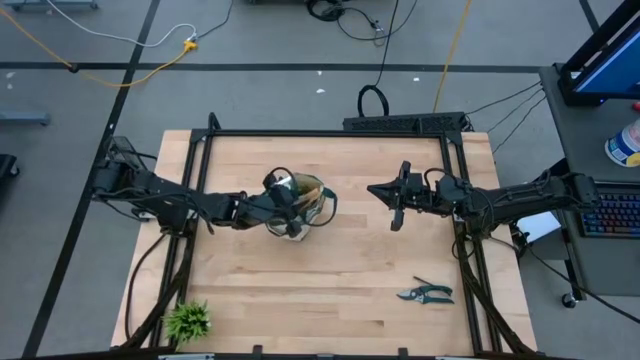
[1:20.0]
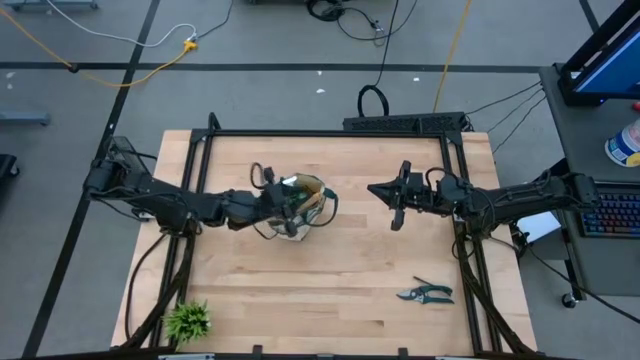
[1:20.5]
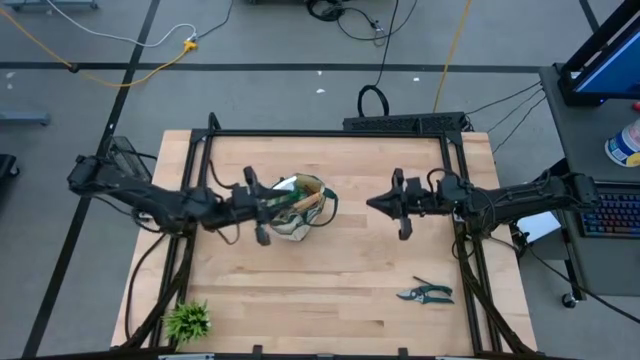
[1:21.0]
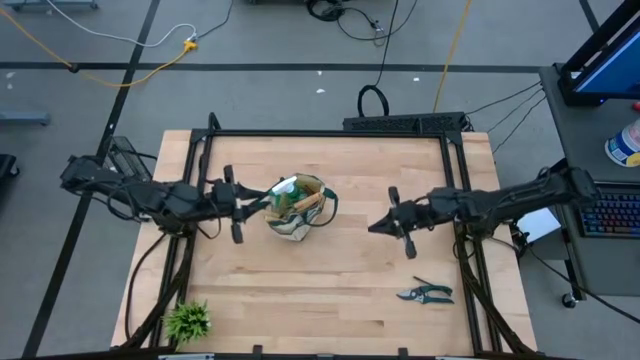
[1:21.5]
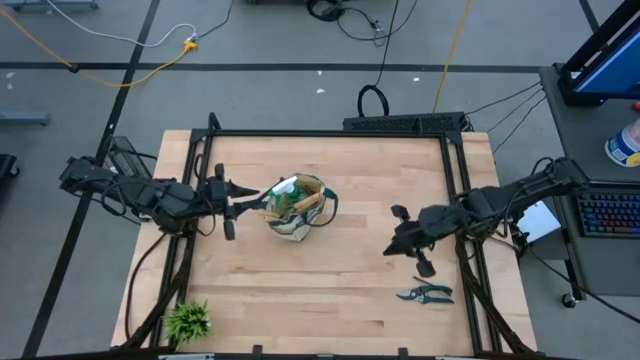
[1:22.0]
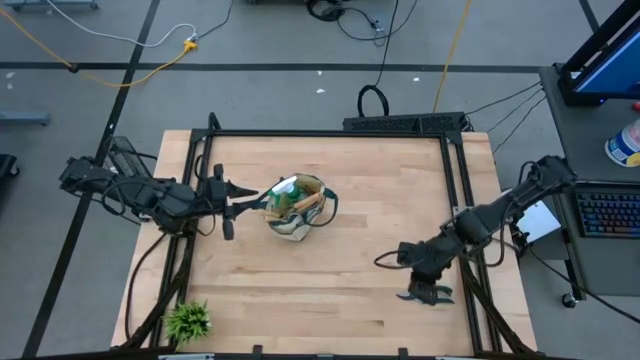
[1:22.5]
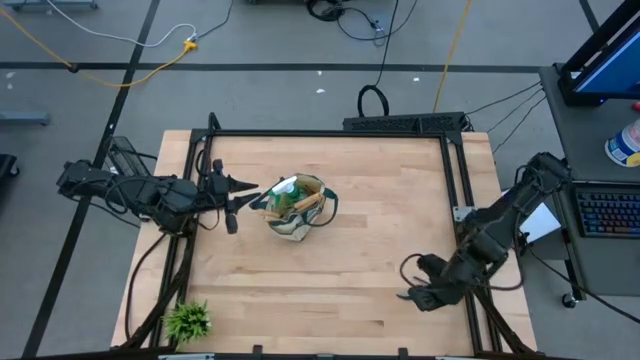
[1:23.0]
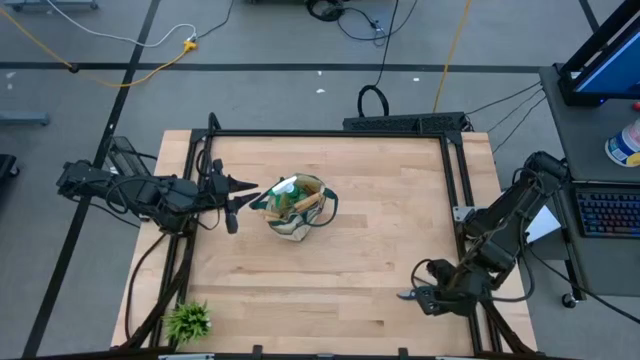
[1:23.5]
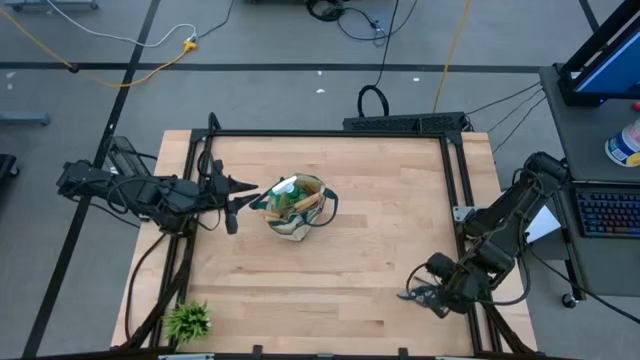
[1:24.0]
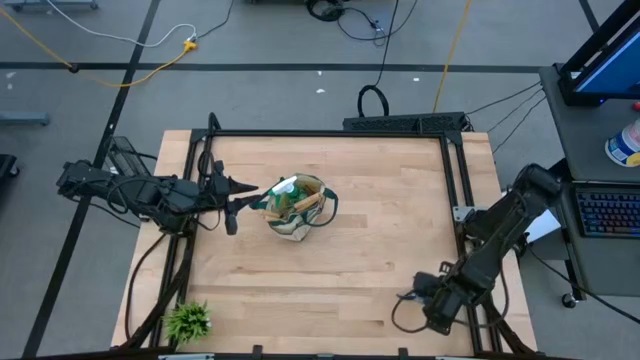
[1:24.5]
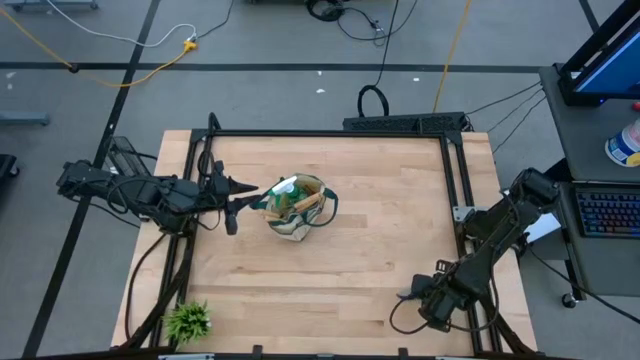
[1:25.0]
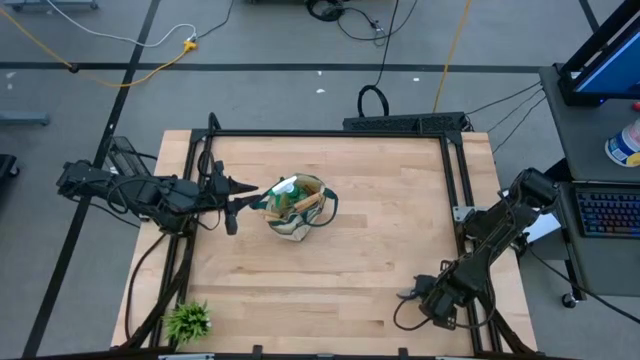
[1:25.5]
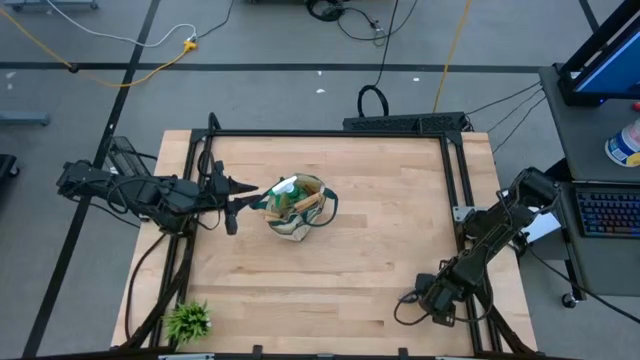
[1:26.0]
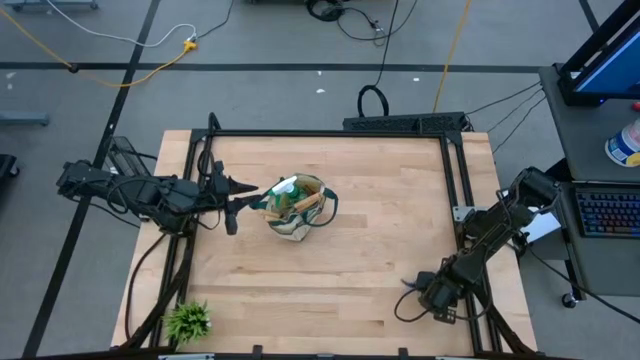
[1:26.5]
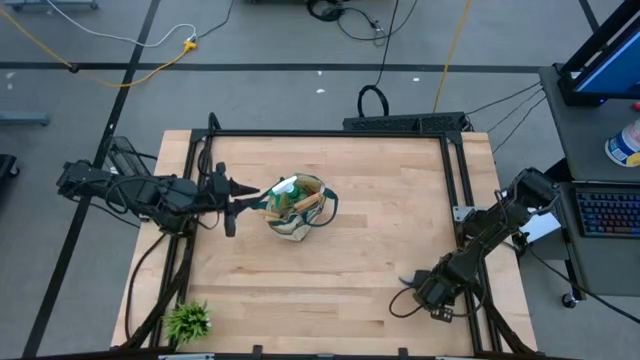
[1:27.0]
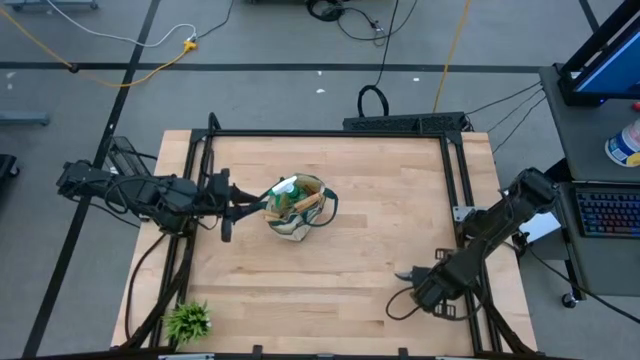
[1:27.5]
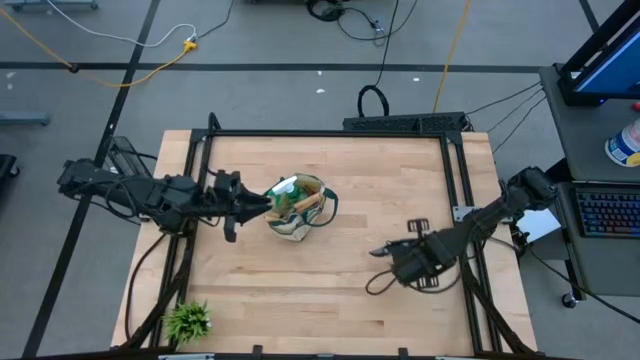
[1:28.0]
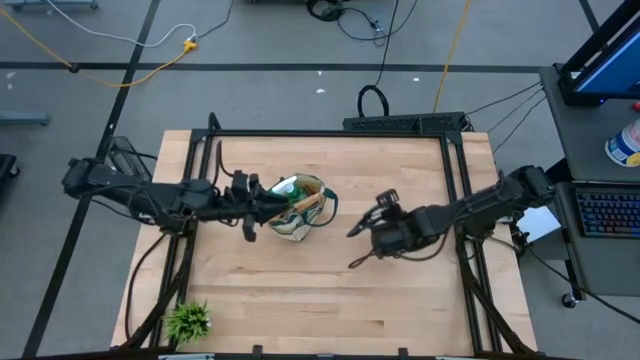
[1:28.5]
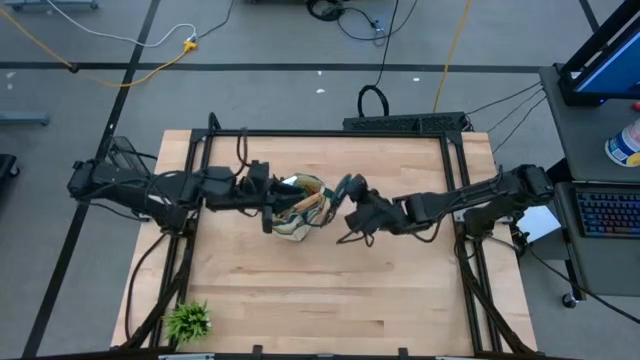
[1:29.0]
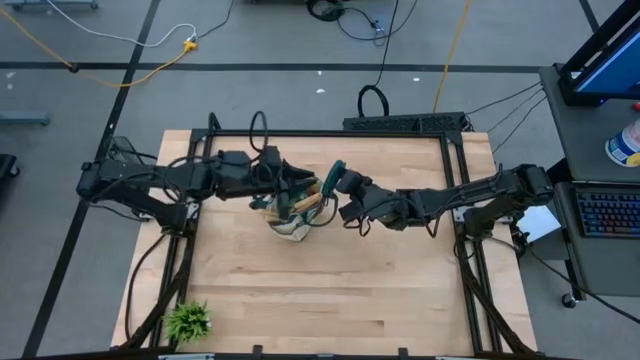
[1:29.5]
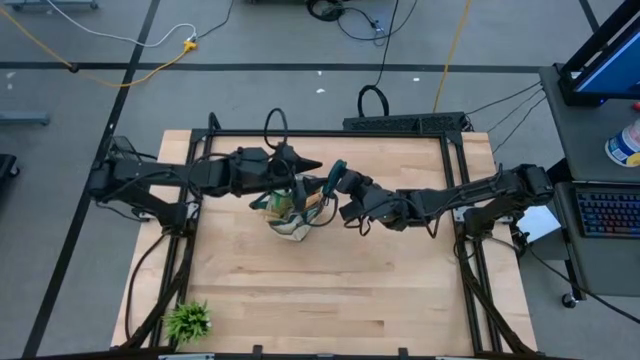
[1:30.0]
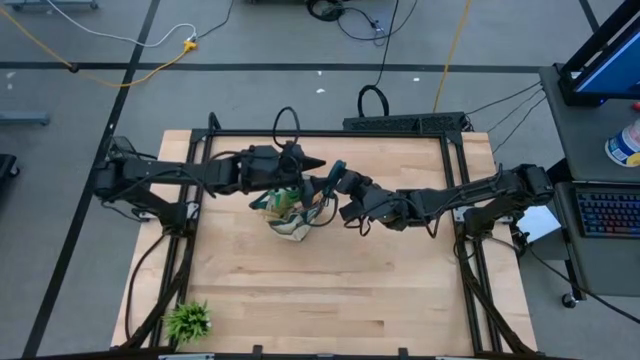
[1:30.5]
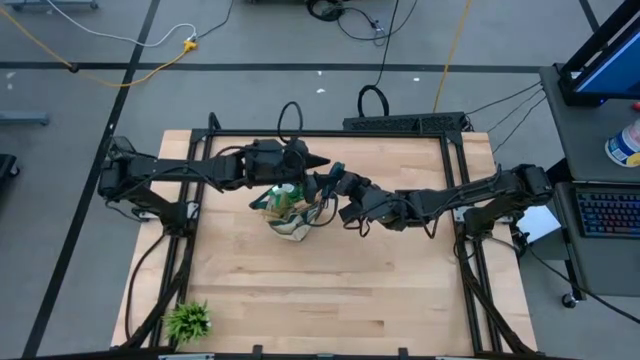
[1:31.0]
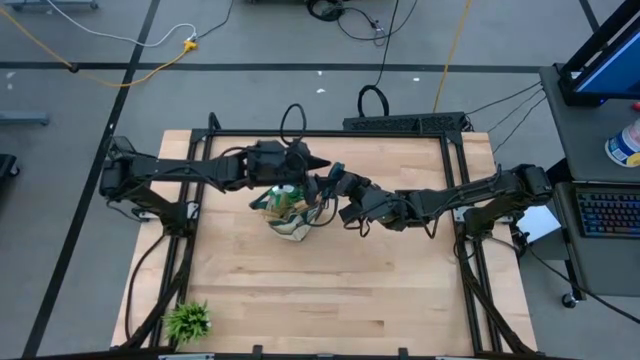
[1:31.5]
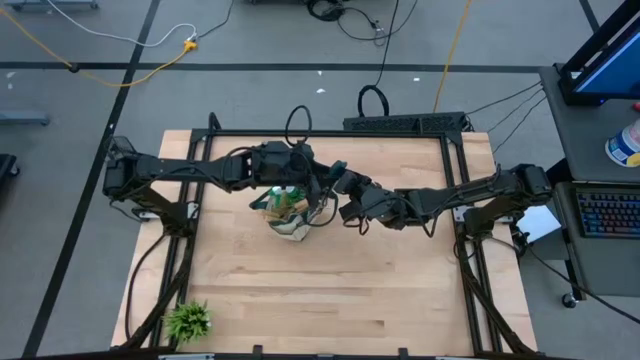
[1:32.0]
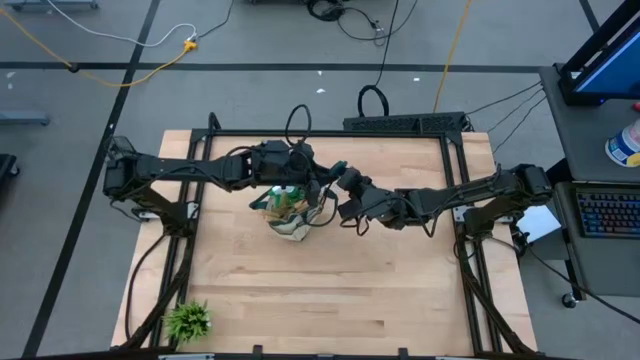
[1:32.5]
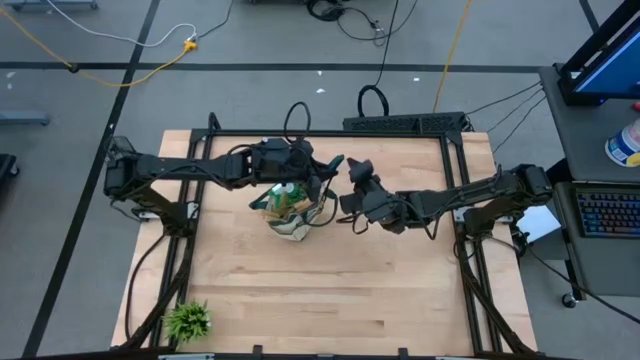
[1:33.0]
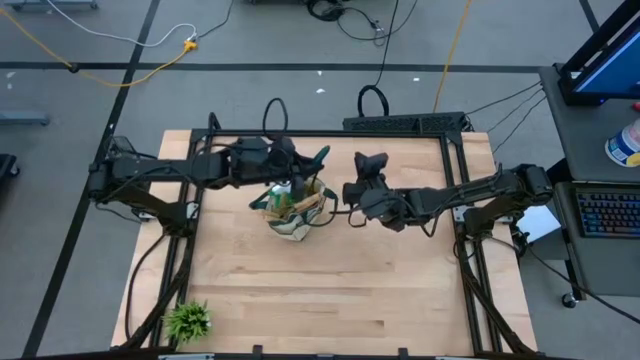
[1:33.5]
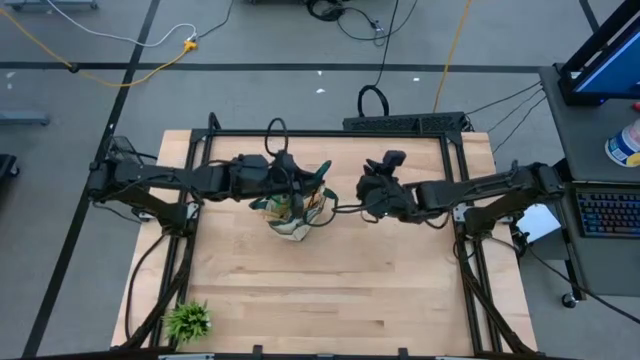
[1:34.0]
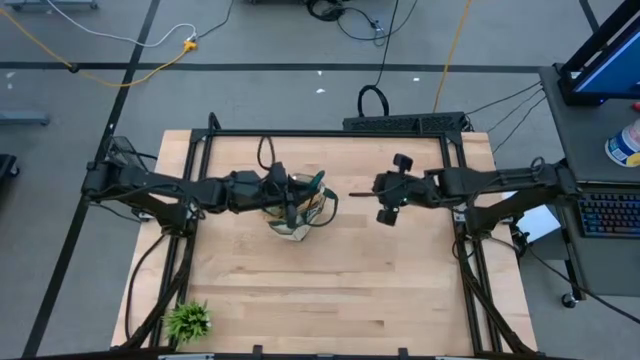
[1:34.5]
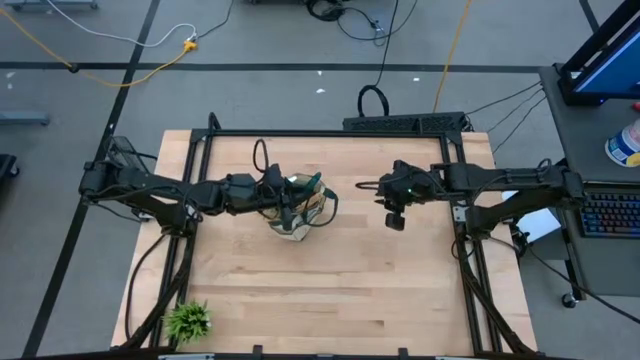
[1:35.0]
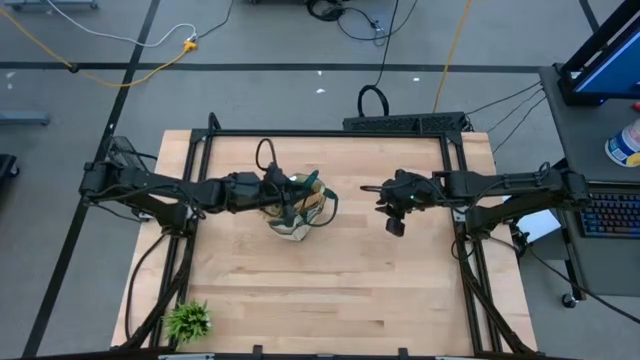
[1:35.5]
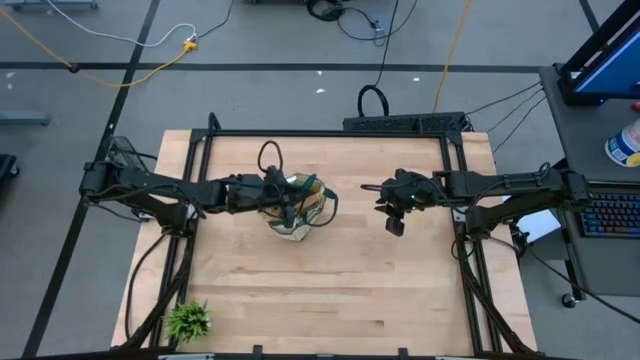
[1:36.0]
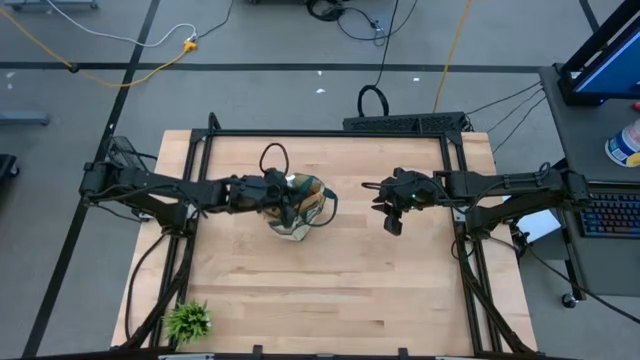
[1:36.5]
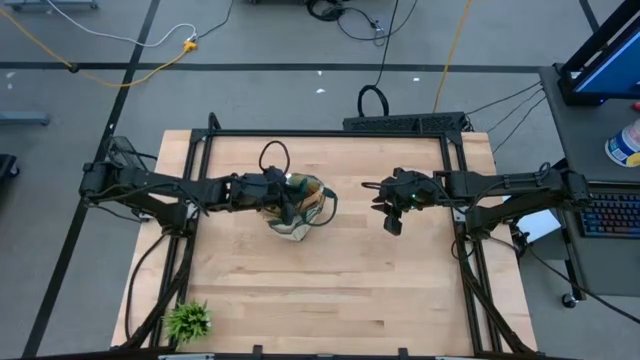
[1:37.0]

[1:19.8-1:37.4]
Task: Pick & Place Garden tools in Gardening bag
Put the green shear scissors into the green gardening bag

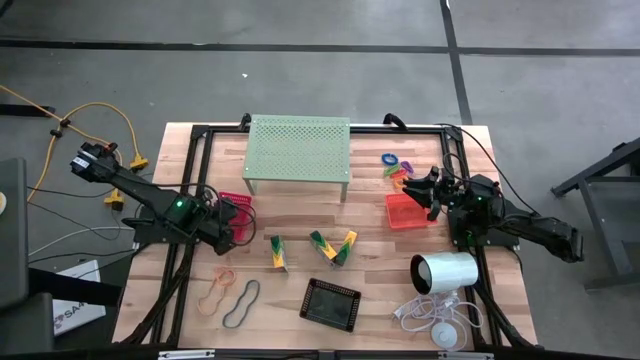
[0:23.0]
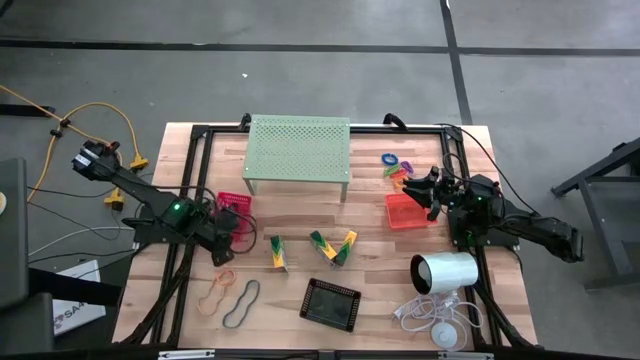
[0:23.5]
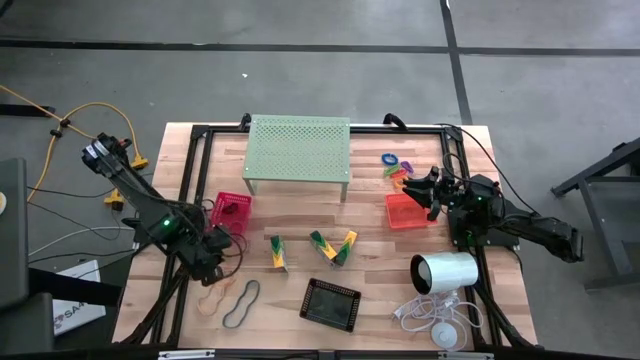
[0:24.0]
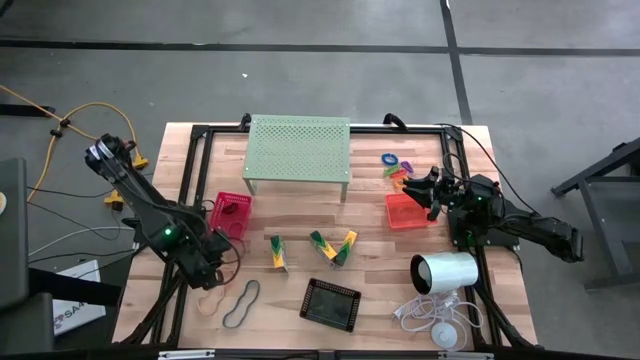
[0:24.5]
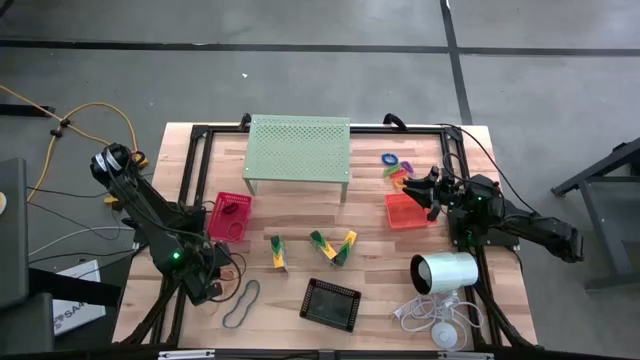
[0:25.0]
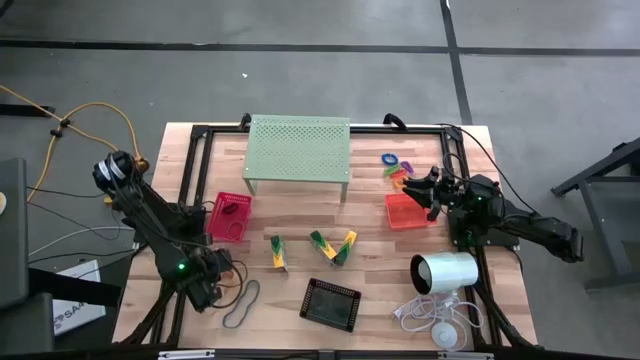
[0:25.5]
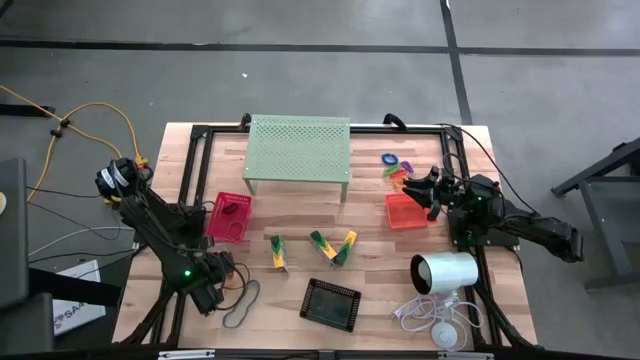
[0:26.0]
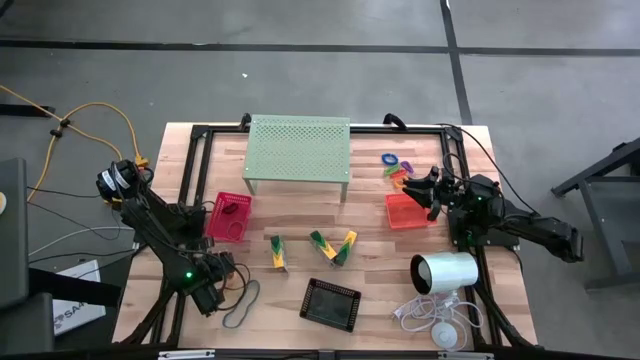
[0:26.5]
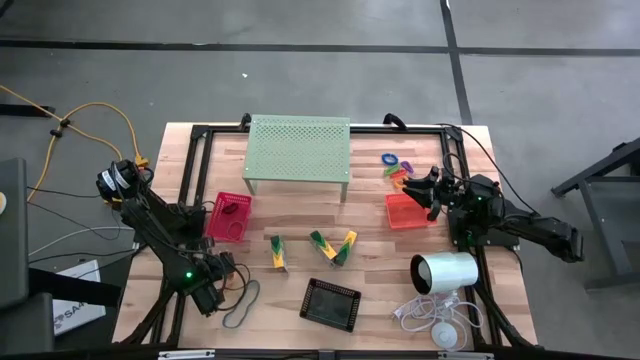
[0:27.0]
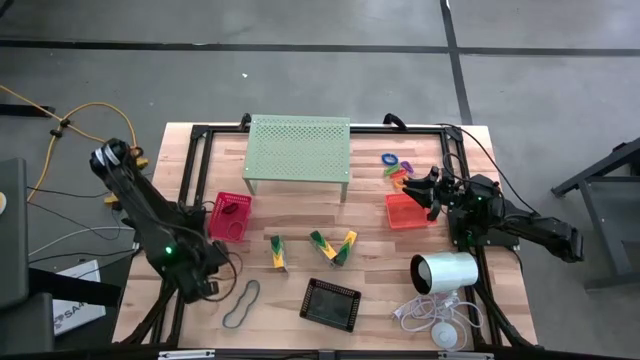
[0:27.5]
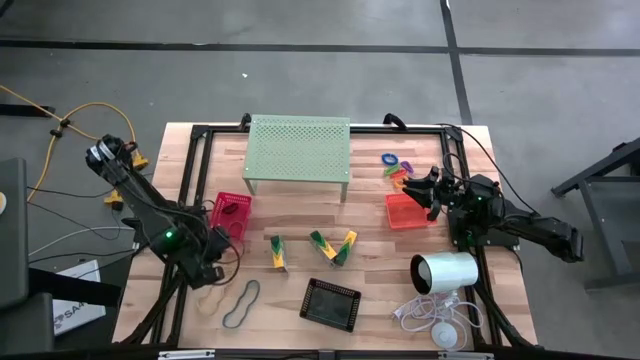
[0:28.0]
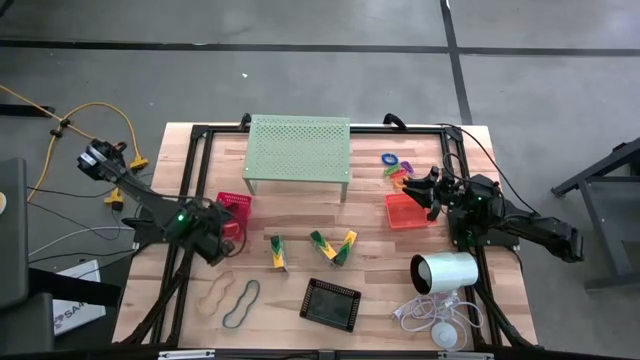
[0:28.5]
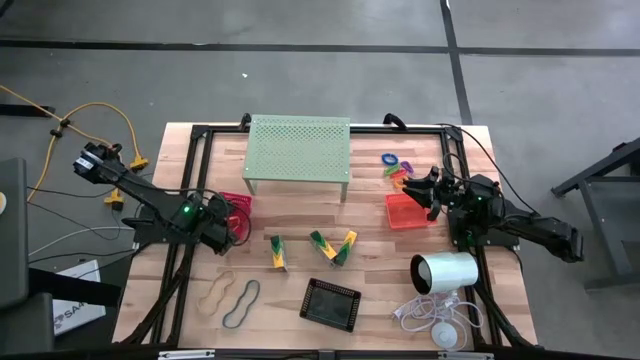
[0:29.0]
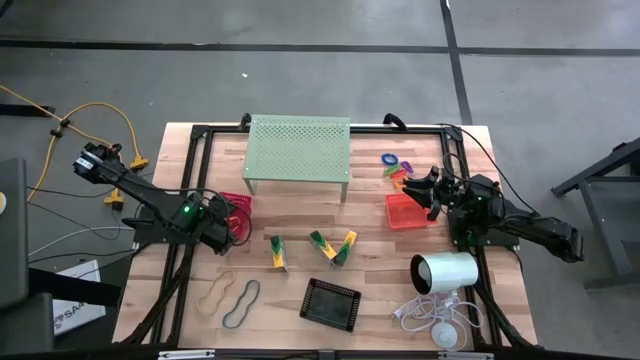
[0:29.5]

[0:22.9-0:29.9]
Task: Pick & Place Office Desk Supplies
Put the yellow rubber band into the red bin
